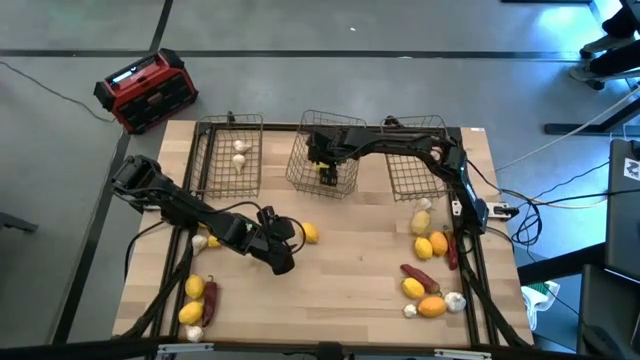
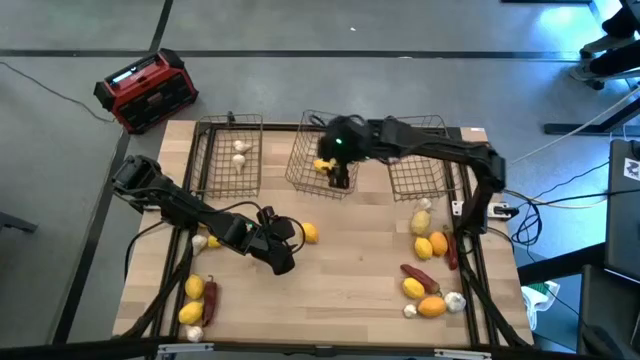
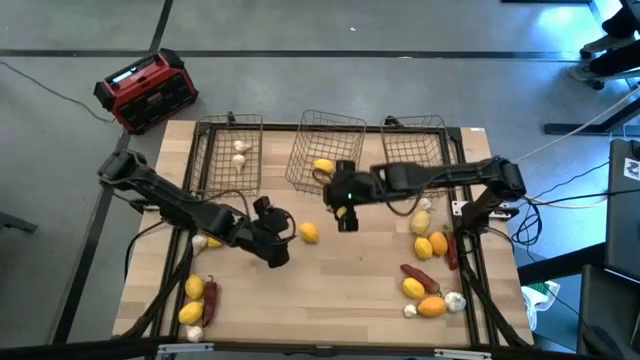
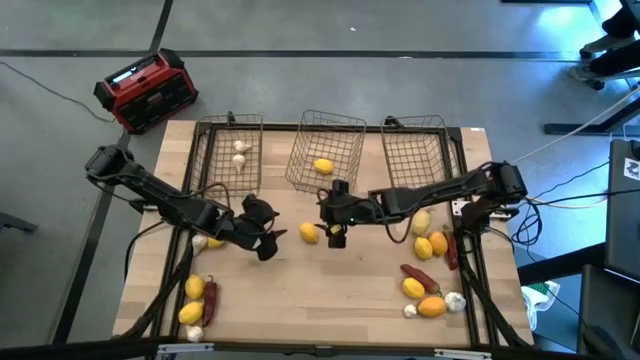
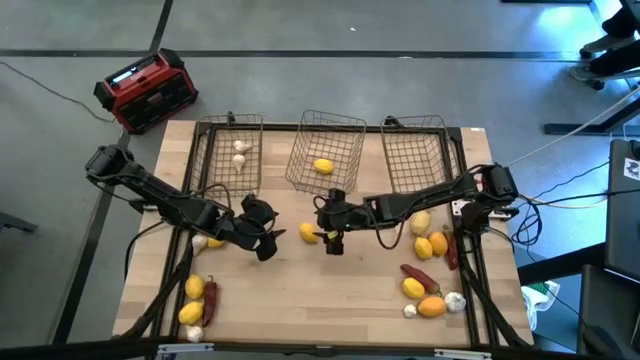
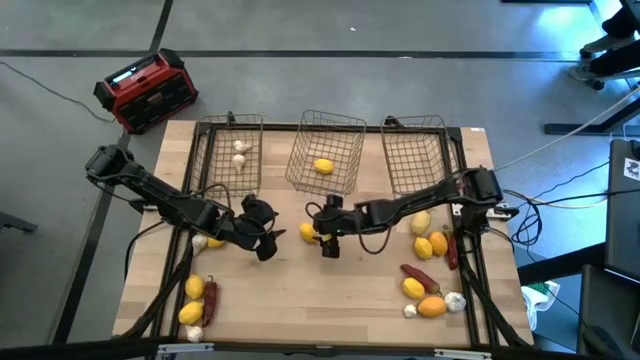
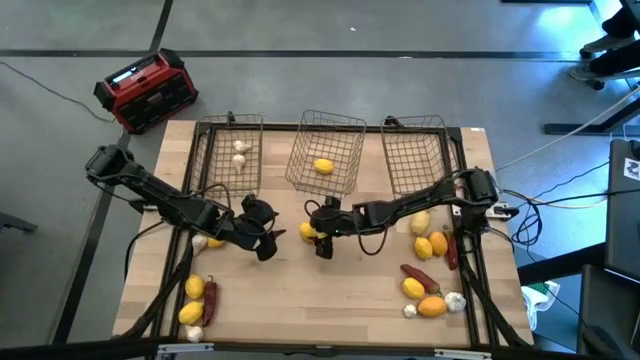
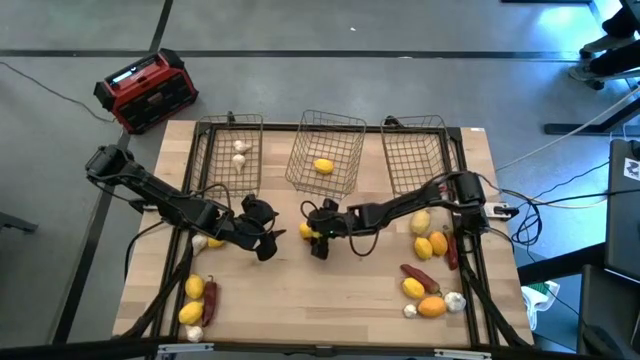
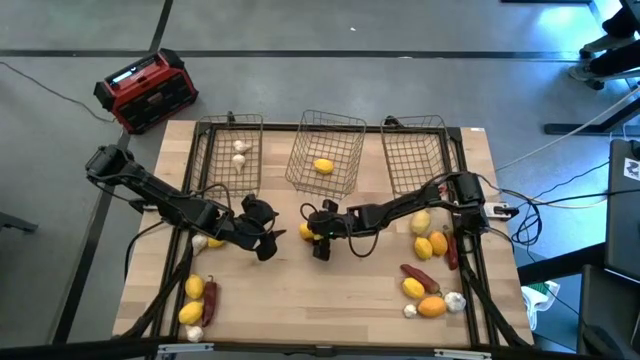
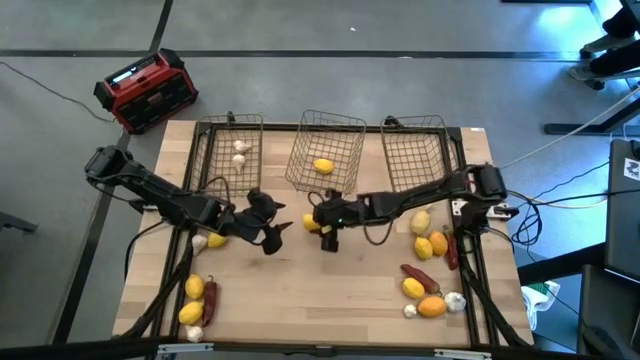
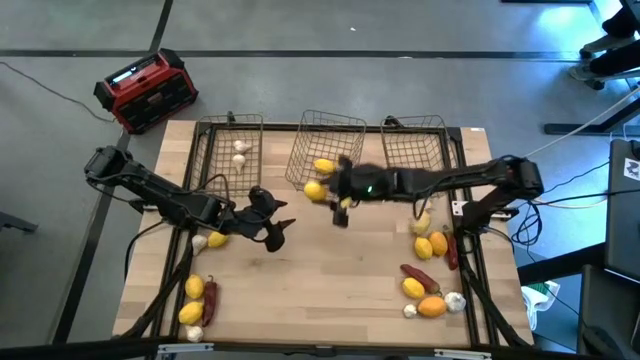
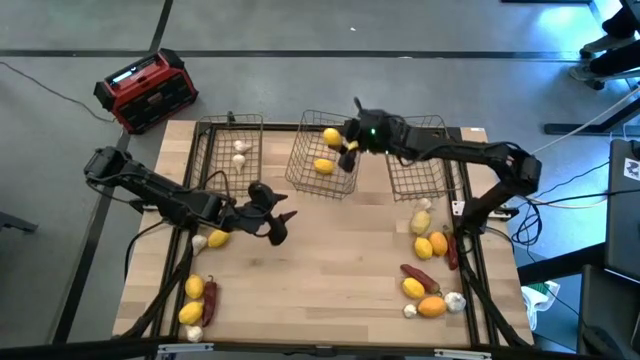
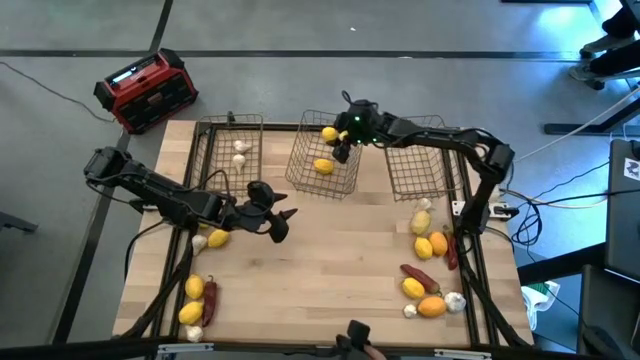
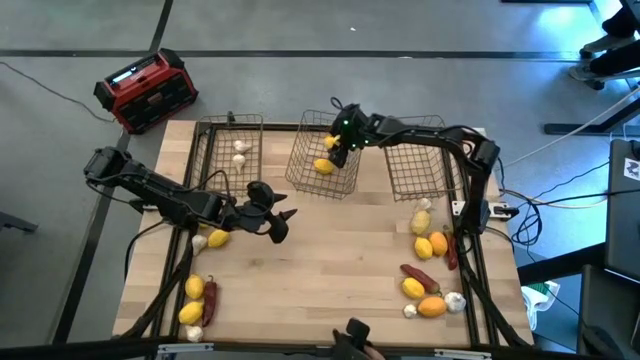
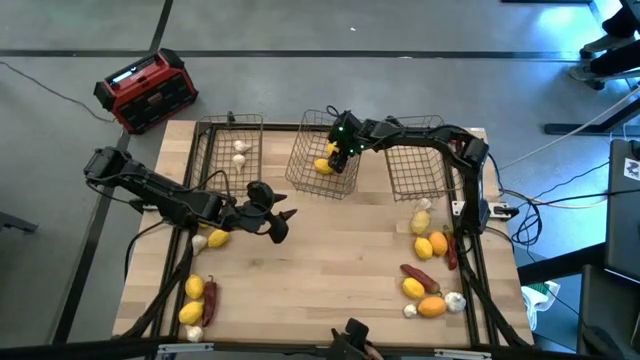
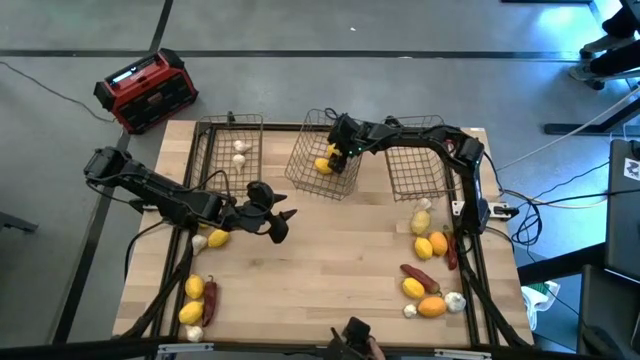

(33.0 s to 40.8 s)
Task: Sort produce into baskets
Put the lemon into the middle wire basket

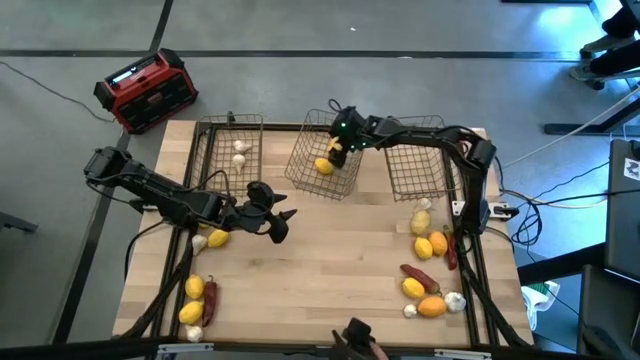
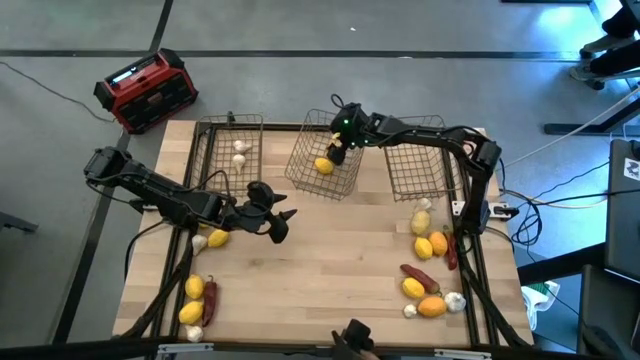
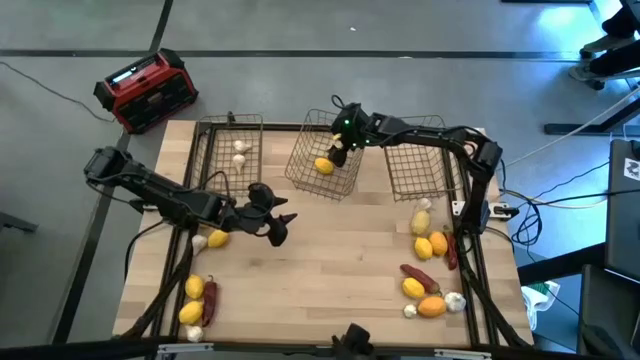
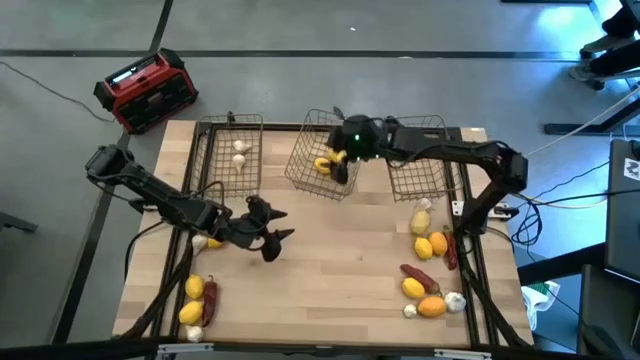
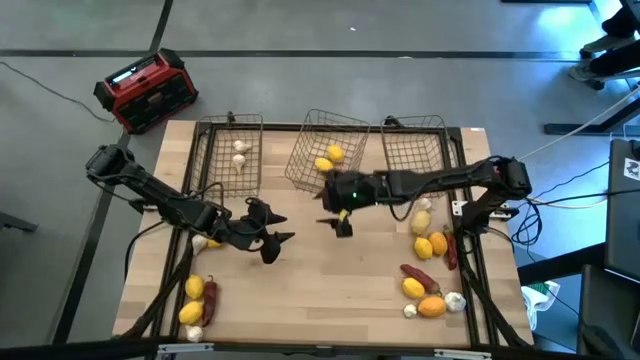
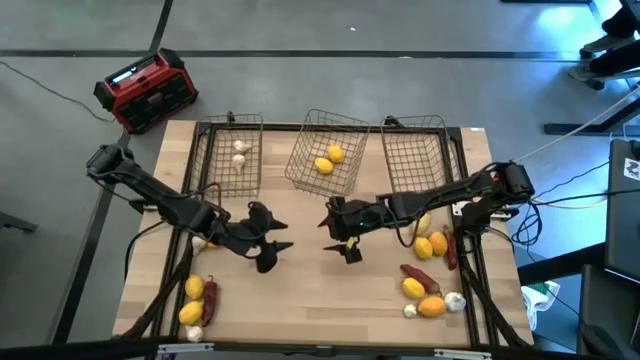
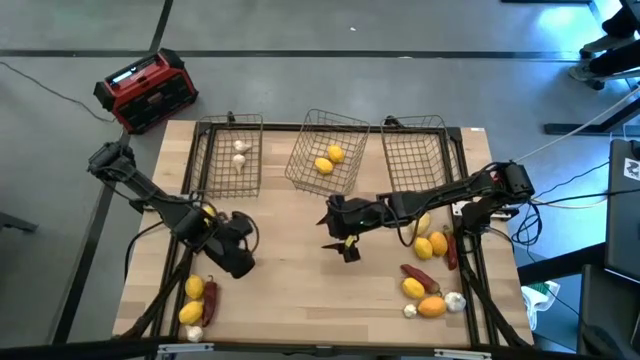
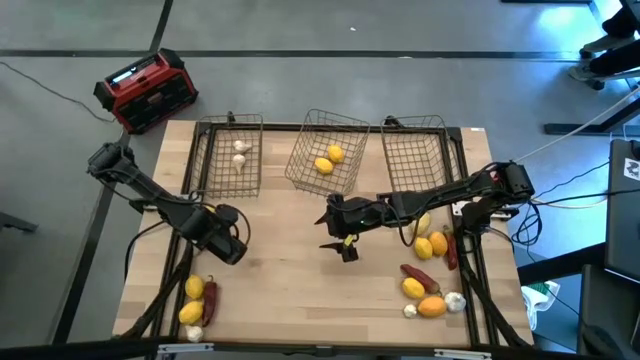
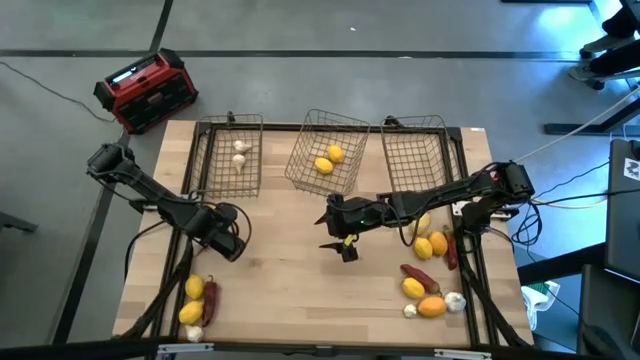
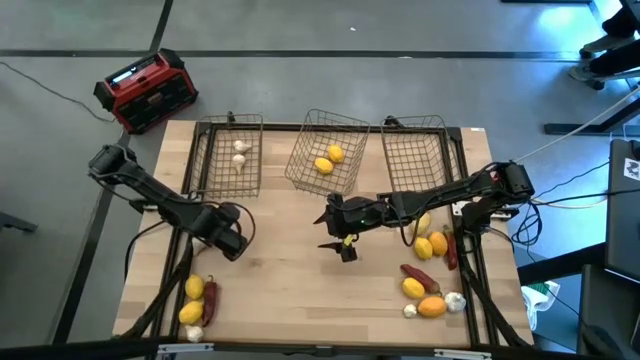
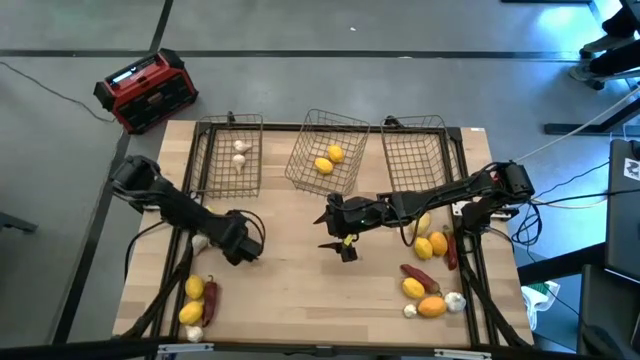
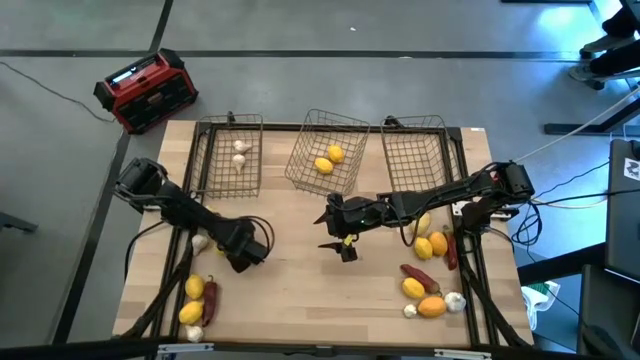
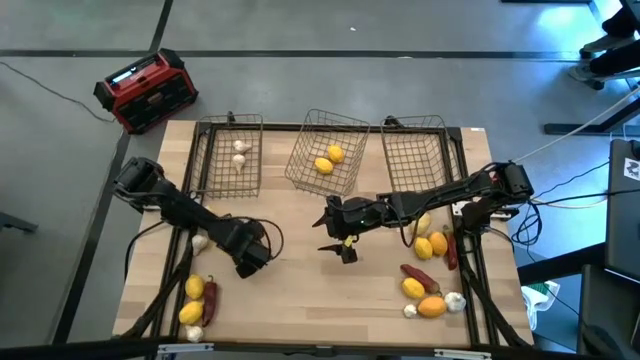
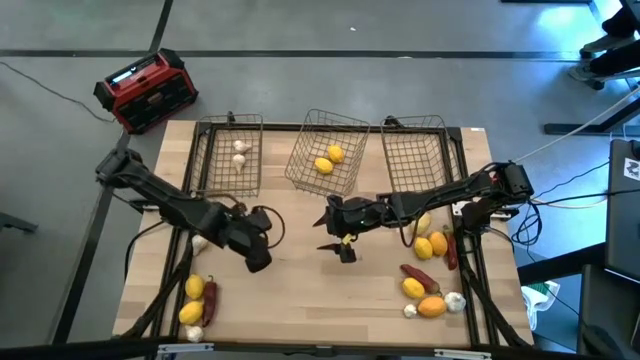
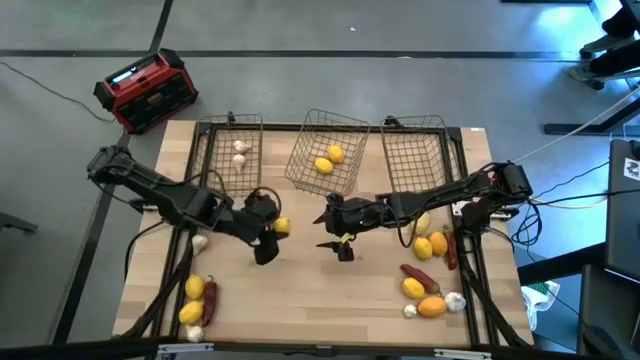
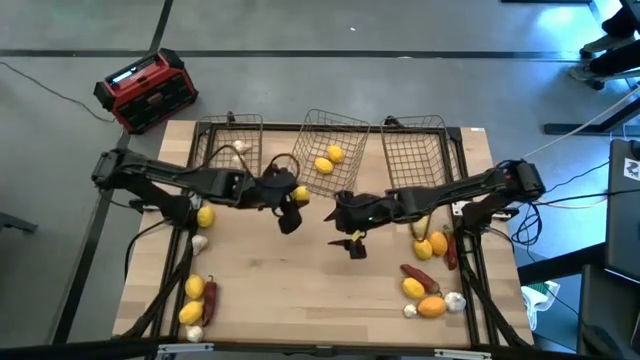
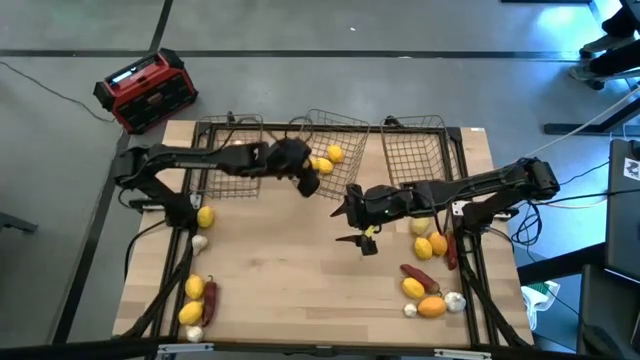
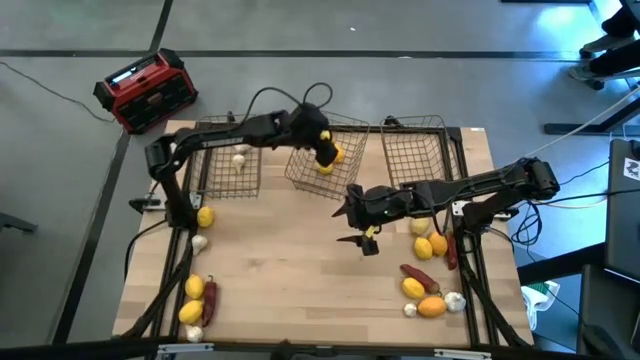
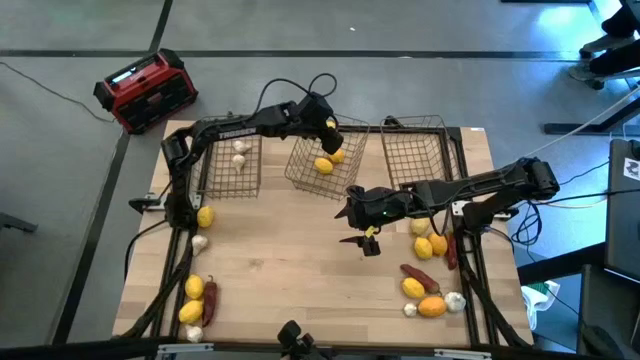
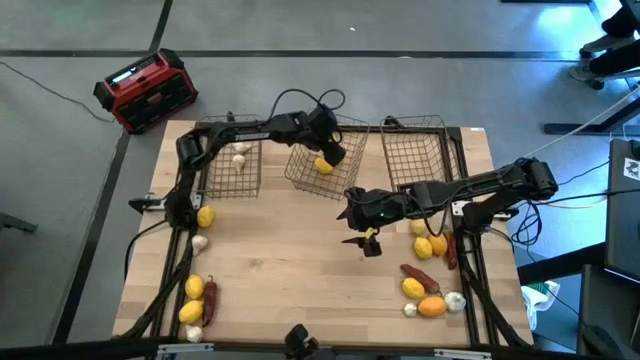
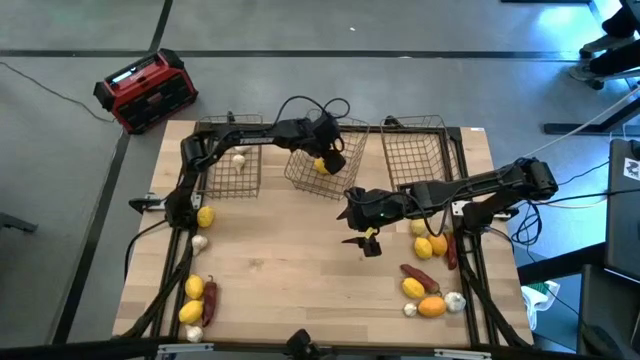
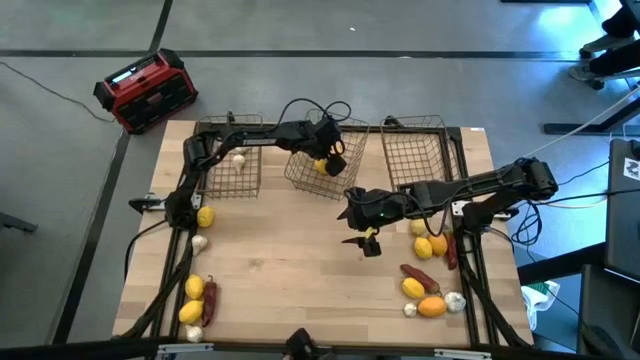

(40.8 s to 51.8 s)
Put the lemon into the middle wire basket
